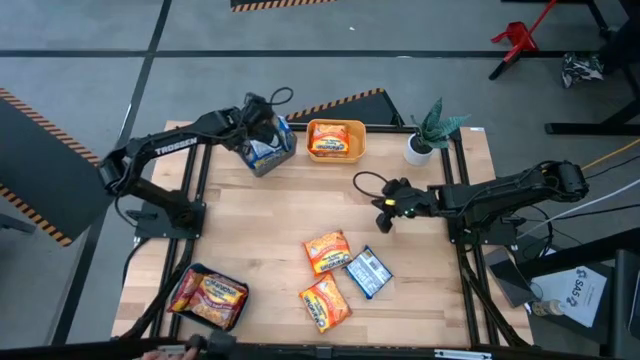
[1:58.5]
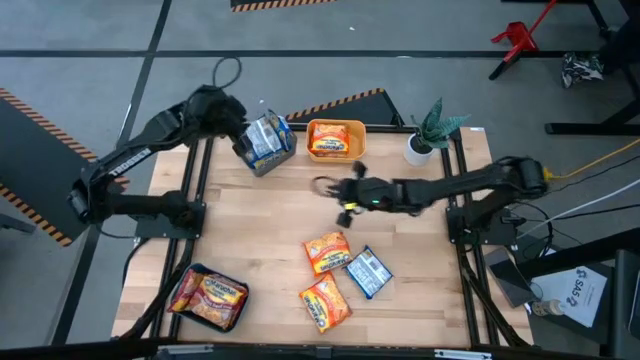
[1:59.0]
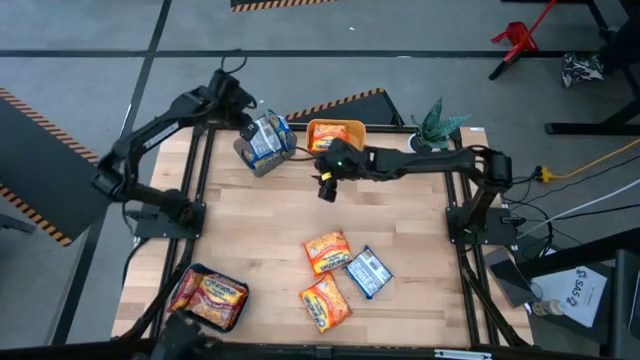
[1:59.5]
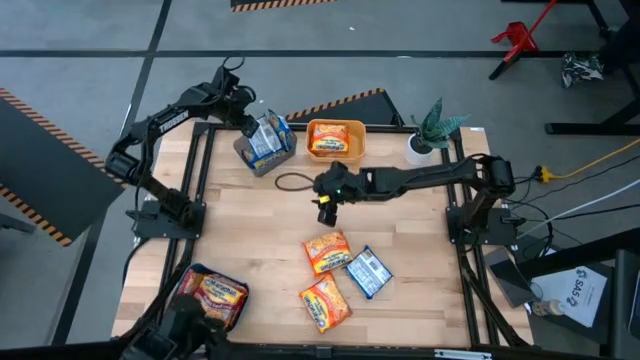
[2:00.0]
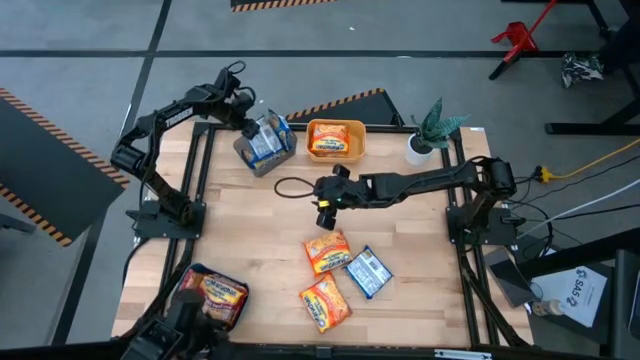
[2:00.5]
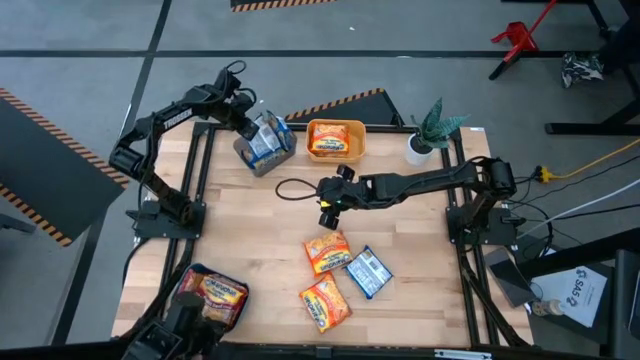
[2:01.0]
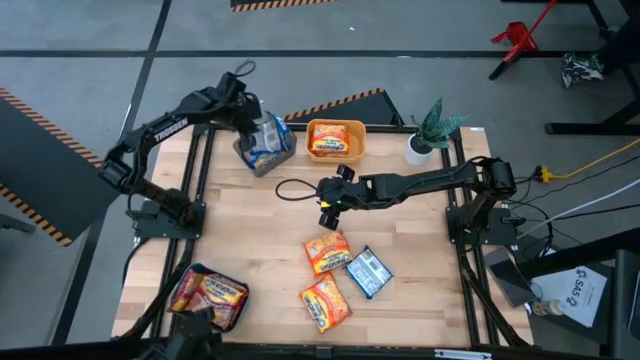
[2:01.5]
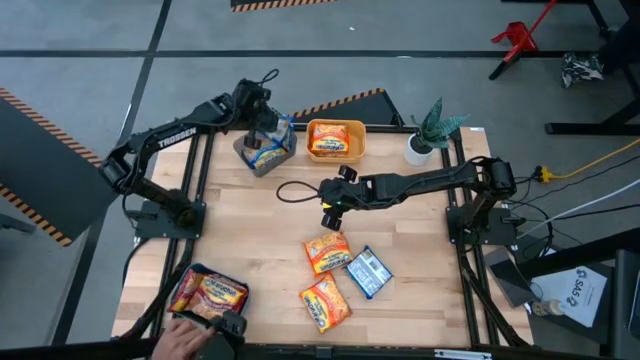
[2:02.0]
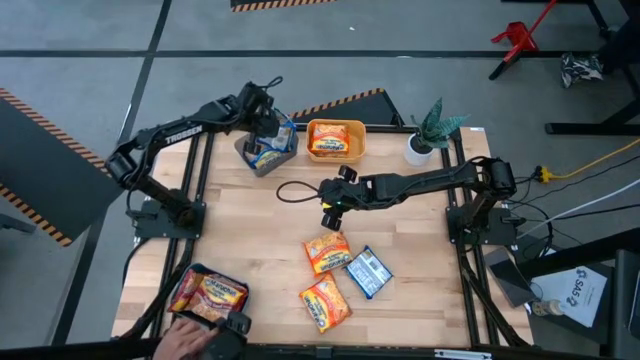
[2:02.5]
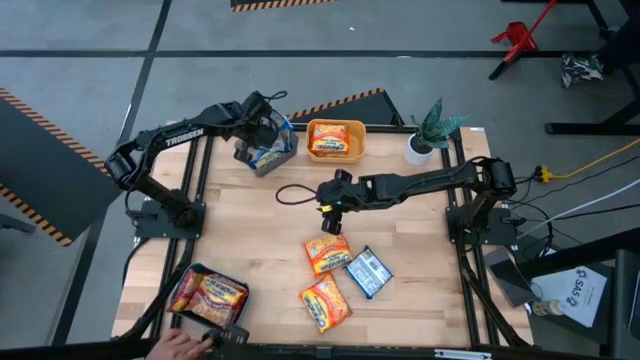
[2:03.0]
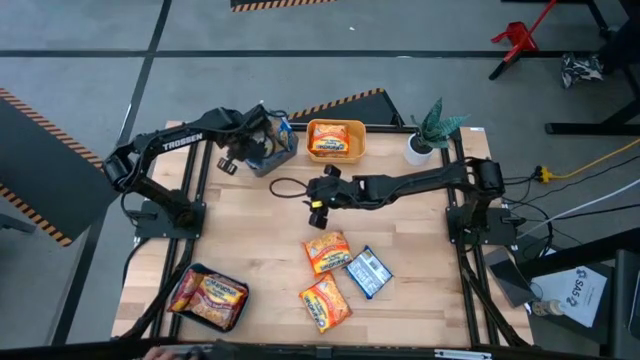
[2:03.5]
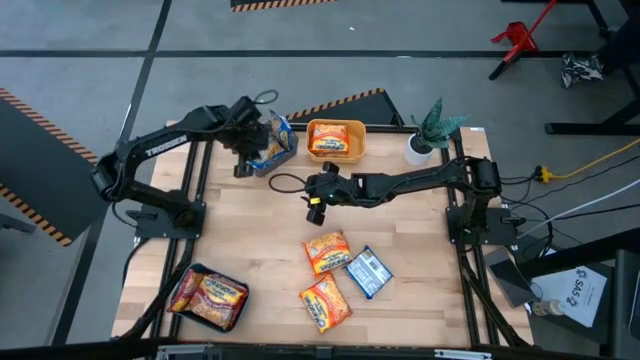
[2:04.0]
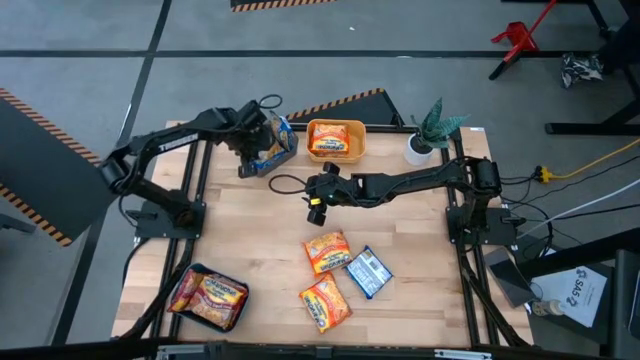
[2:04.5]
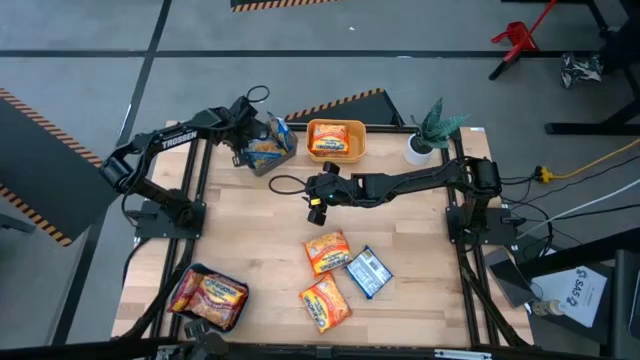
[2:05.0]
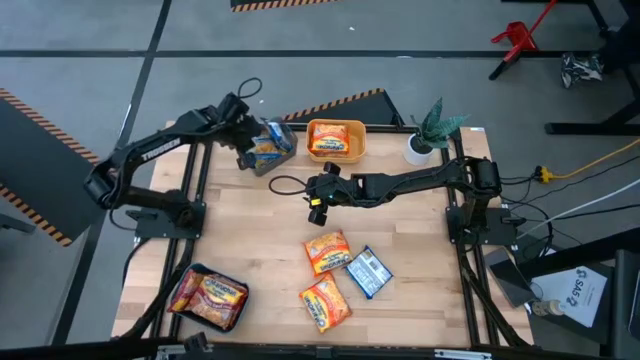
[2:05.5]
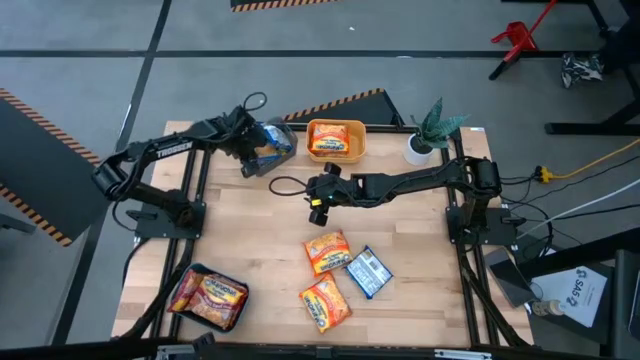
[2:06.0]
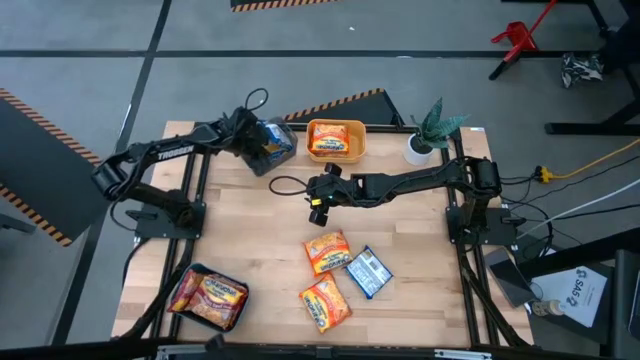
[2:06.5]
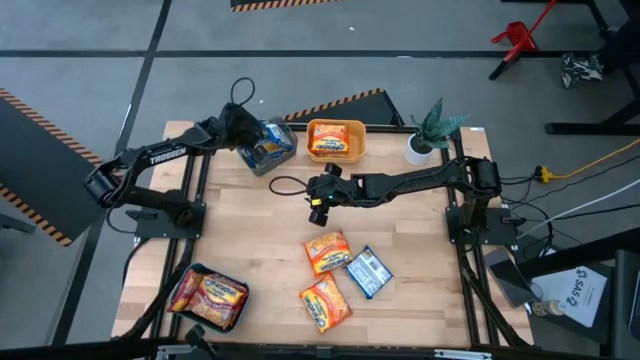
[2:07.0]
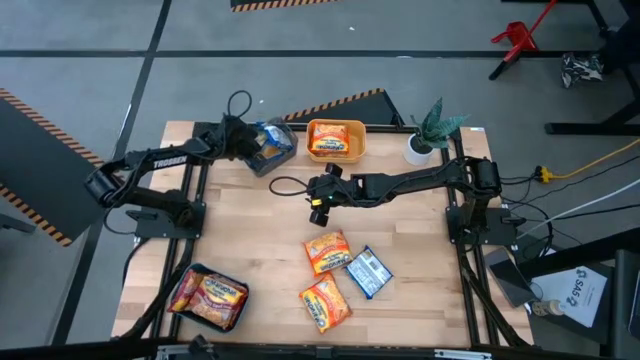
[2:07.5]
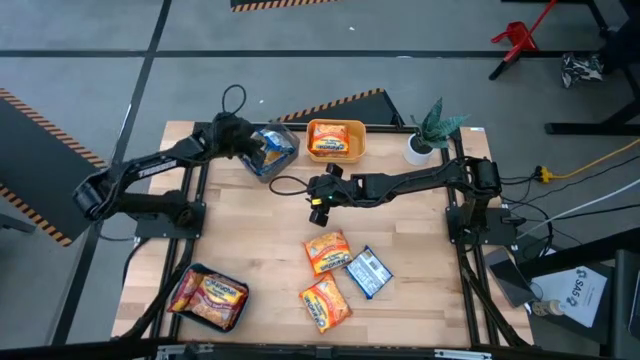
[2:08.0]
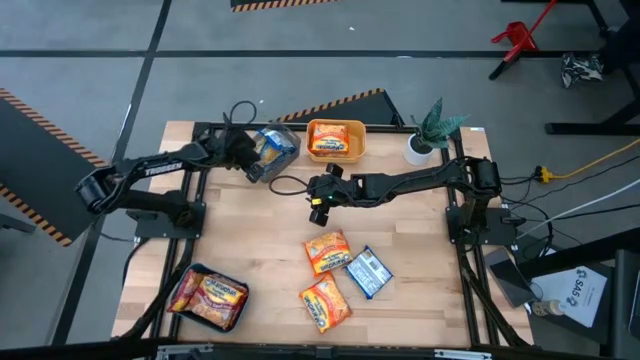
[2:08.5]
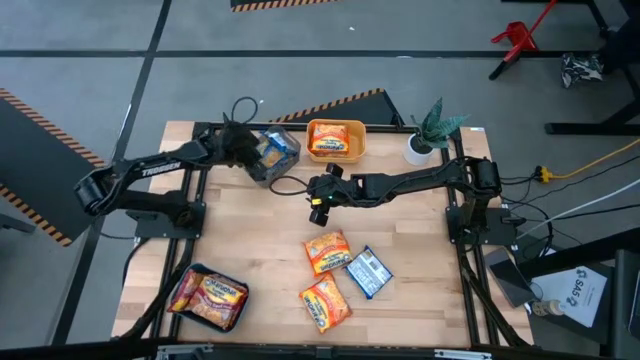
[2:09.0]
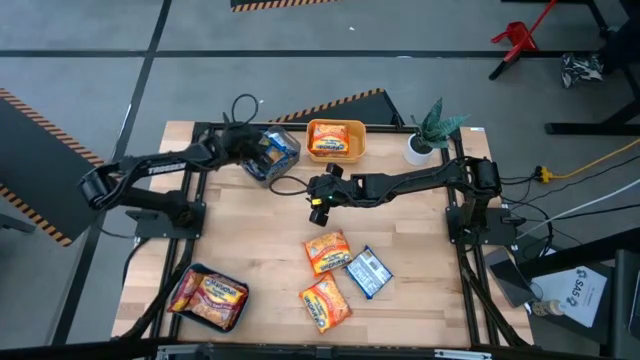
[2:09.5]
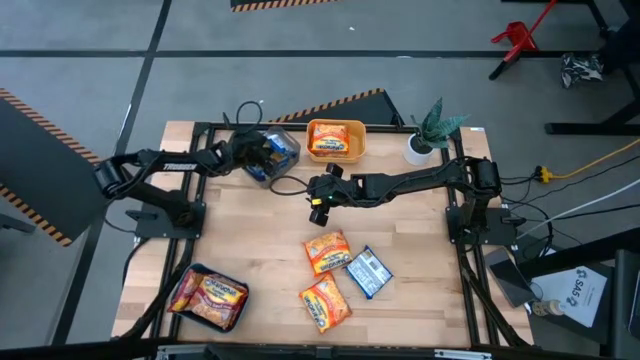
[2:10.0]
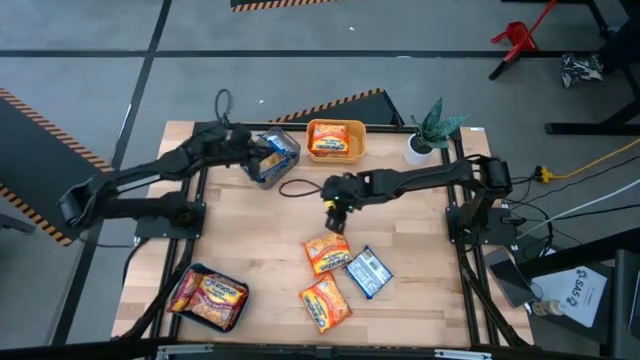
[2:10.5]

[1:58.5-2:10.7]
Task: Sort Maruchan noodles
Adjust the packs of blue ramen in the black transparent bin

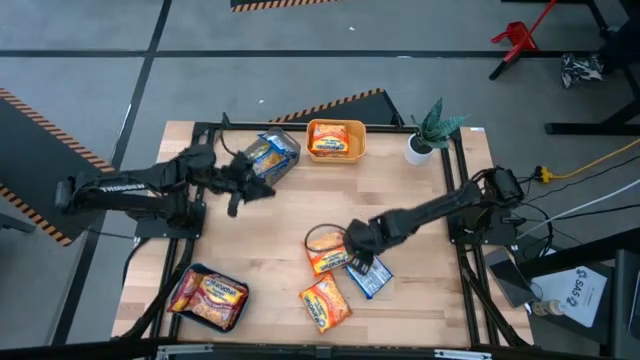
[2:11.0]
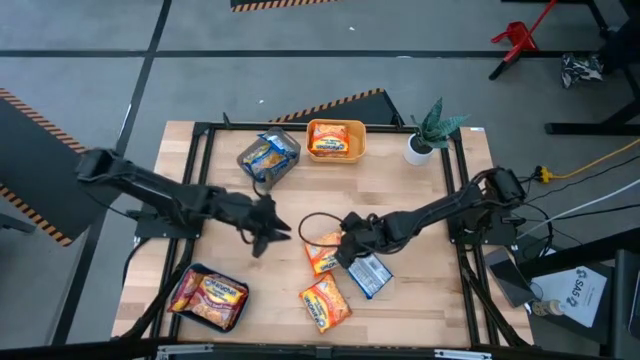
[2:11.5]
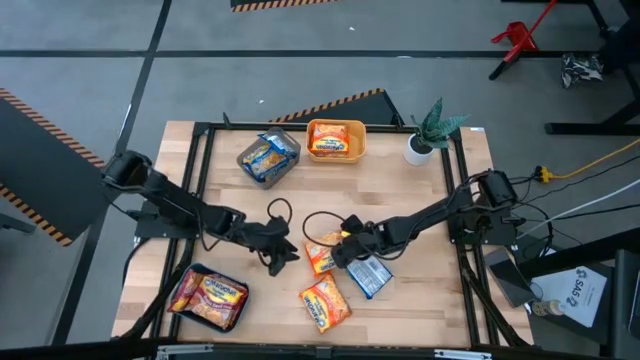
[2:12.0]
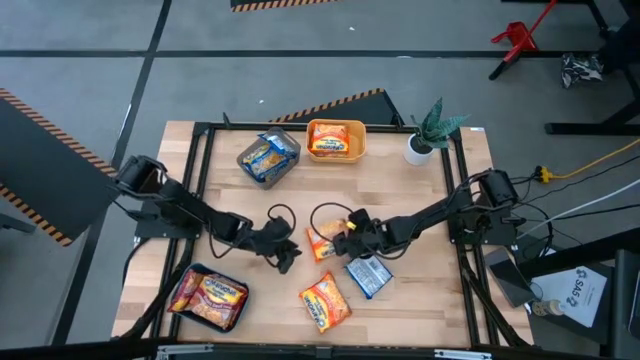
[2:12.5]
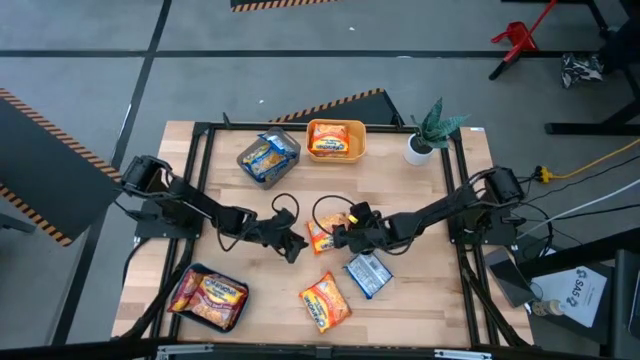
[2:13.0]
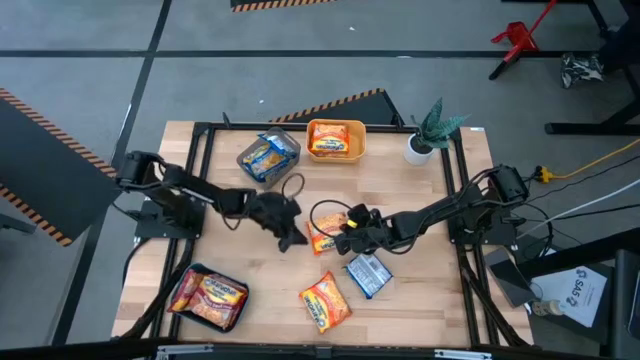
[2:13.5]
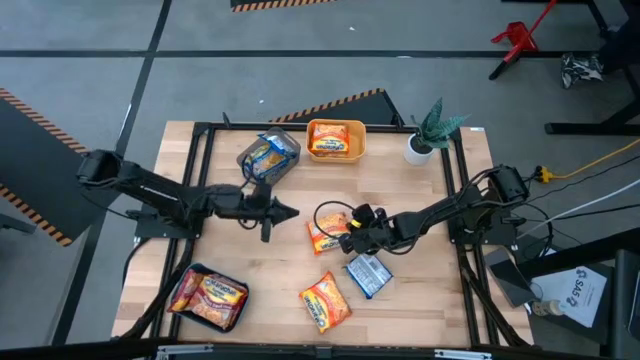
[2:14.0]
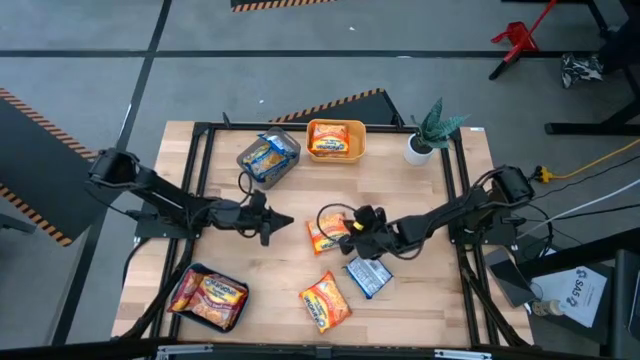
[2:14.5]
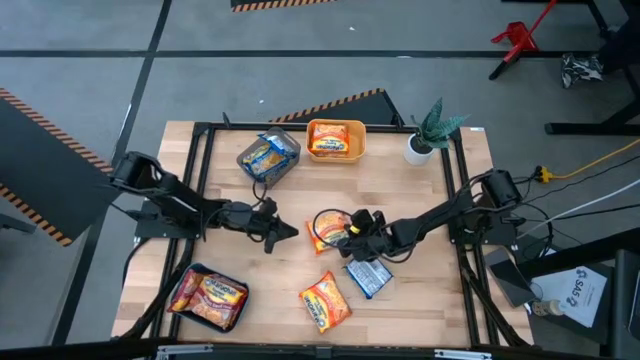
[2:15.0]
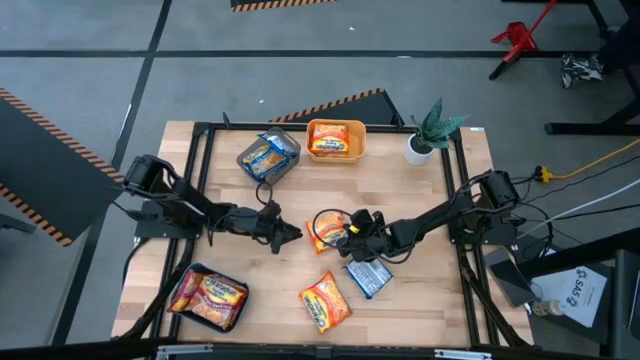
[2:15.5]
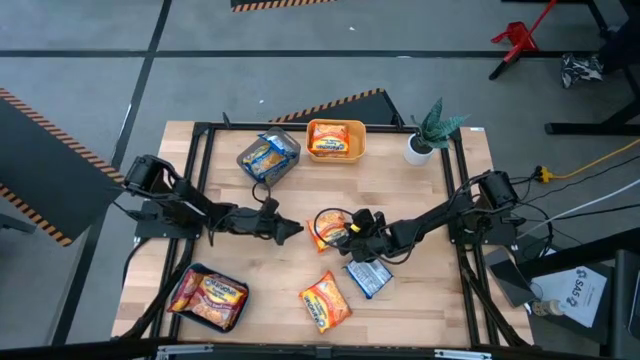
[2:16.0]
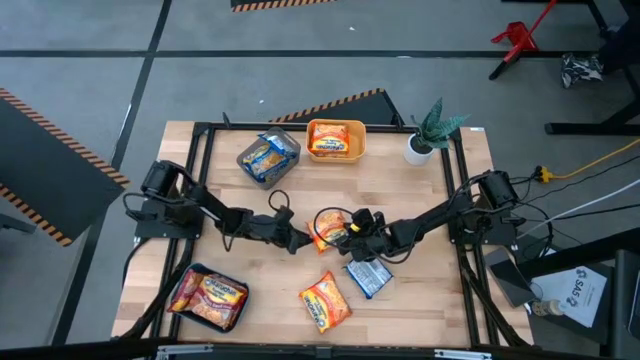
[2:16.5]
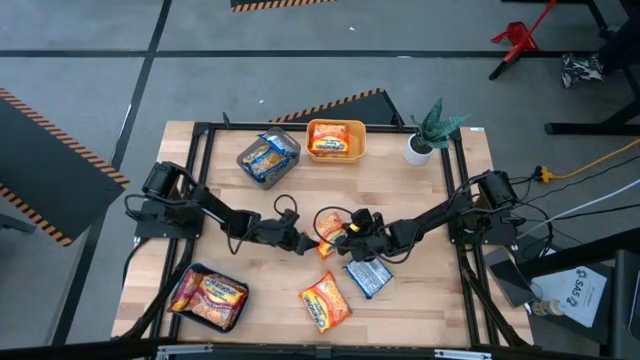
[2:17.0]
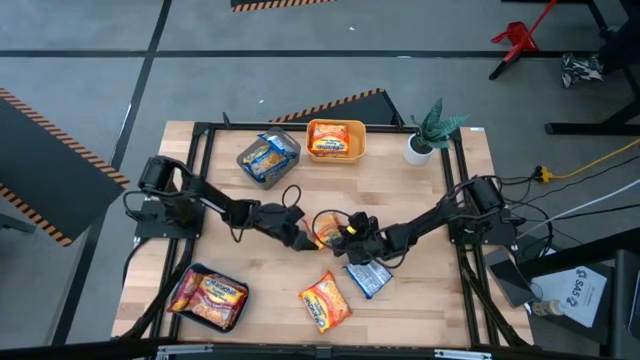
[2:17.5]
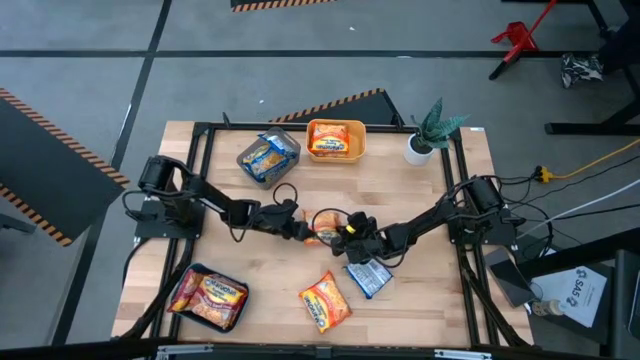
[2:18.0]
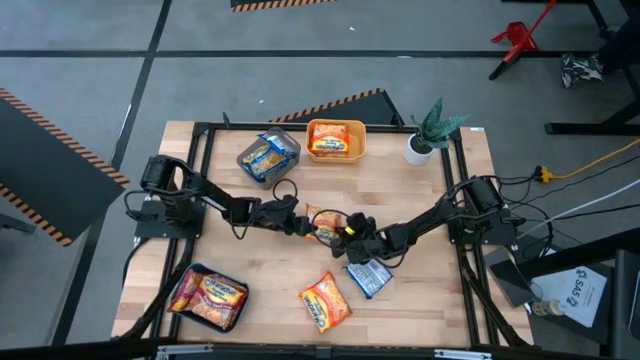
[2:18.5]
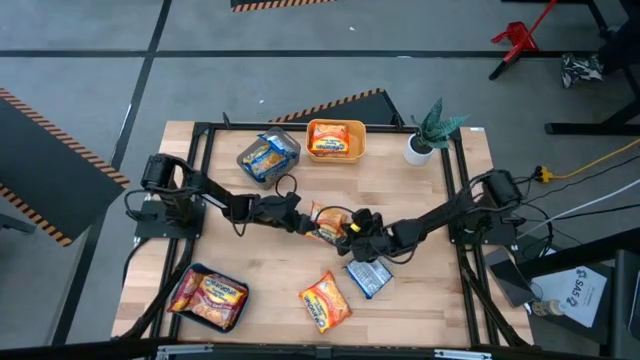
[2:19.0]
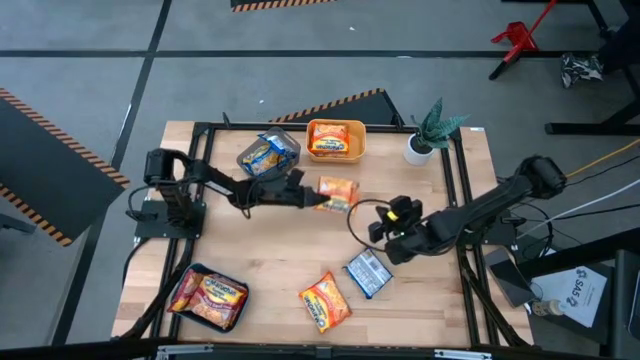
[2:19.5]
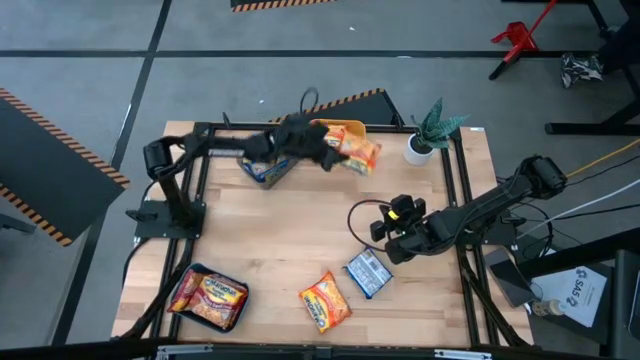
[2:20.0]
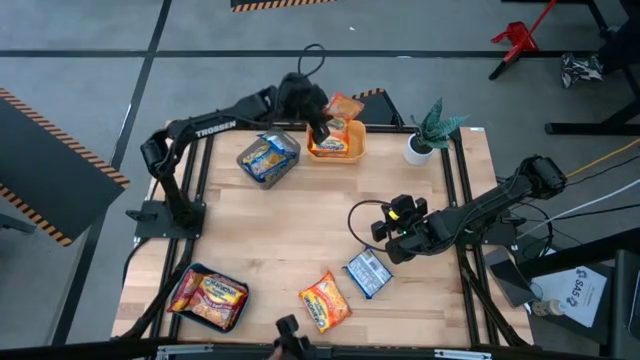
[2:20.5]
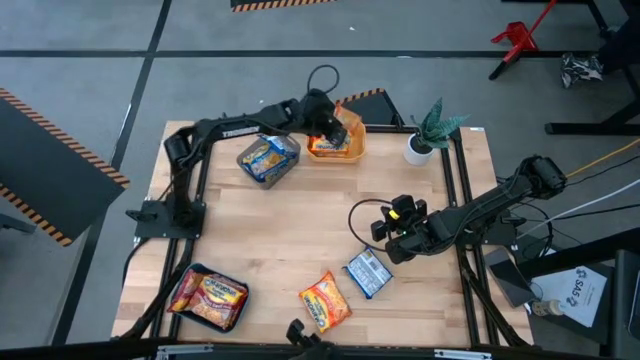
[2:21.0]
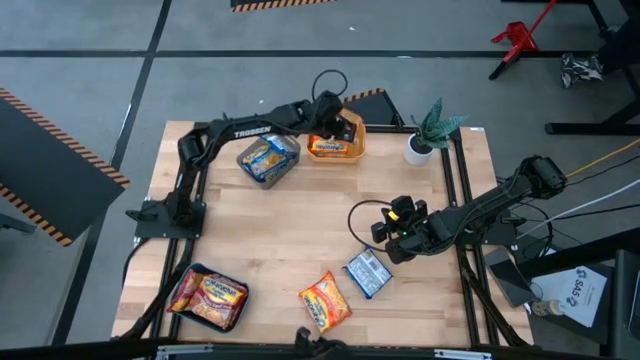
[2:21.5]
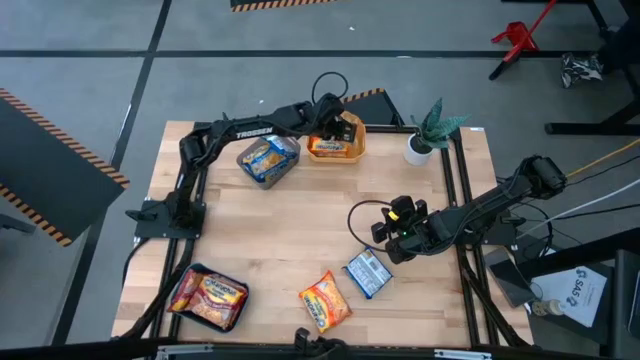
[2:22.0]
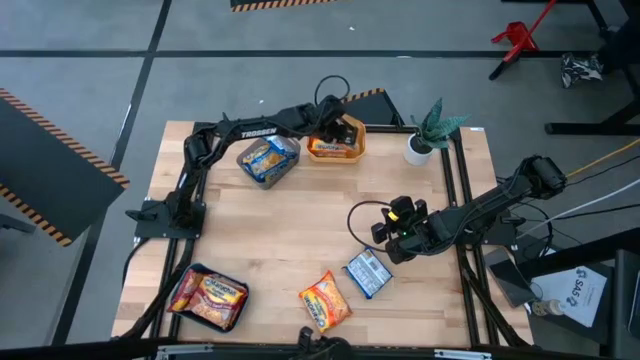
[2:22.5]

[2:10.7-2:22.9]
Adjust the packs of blue ramen in the black transparent bin
